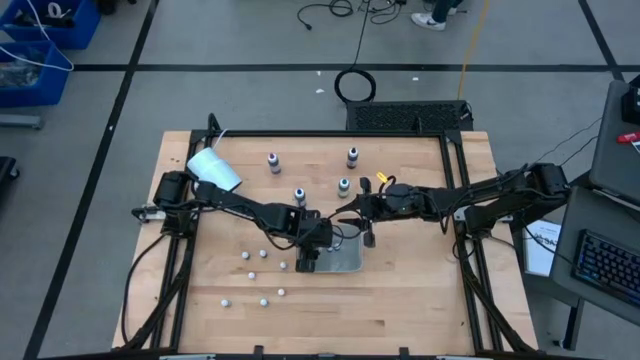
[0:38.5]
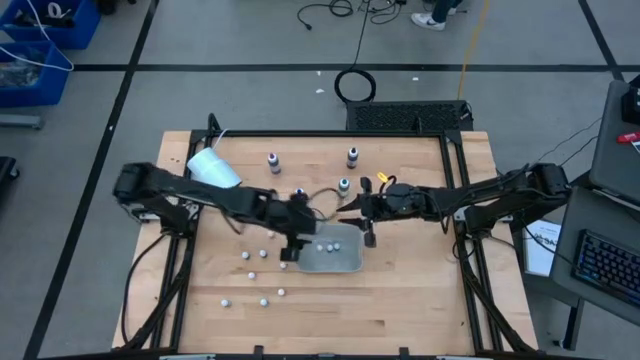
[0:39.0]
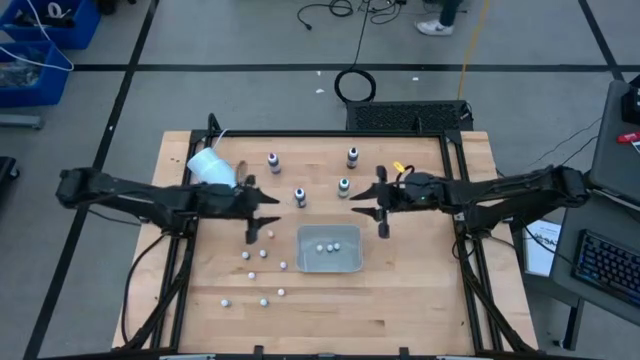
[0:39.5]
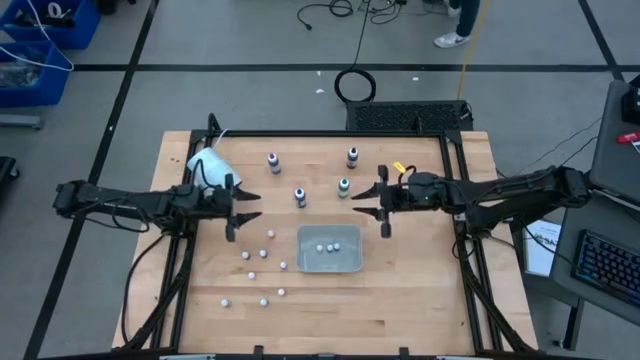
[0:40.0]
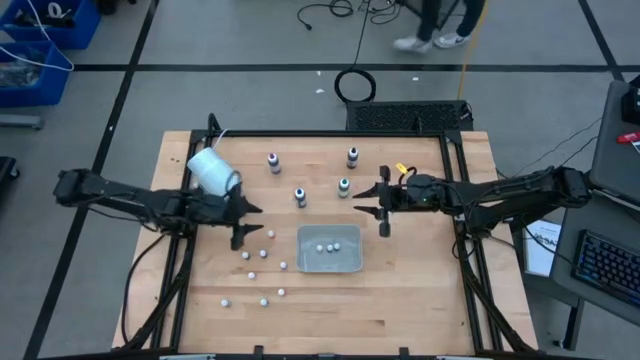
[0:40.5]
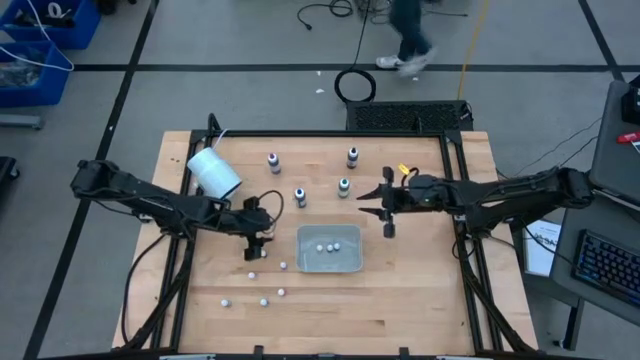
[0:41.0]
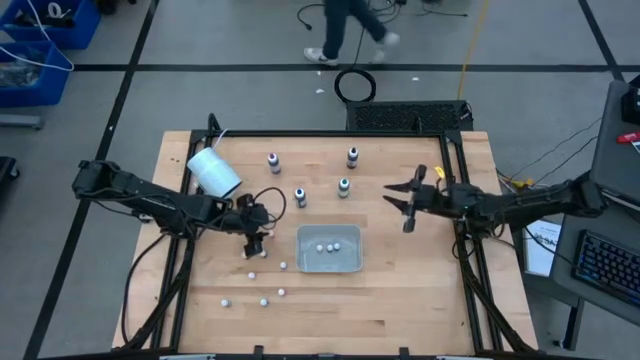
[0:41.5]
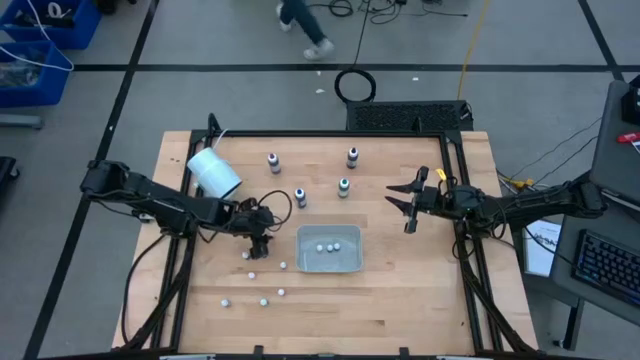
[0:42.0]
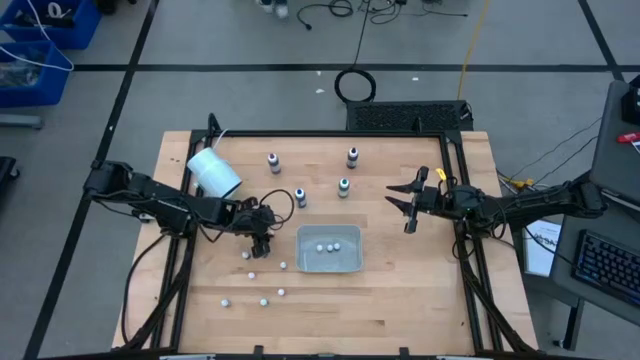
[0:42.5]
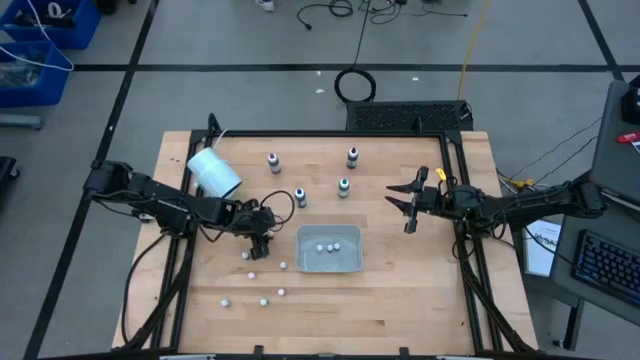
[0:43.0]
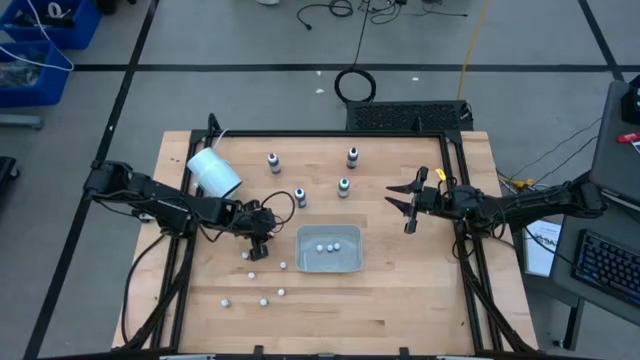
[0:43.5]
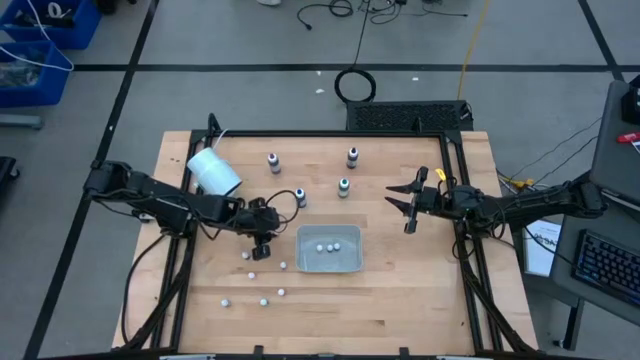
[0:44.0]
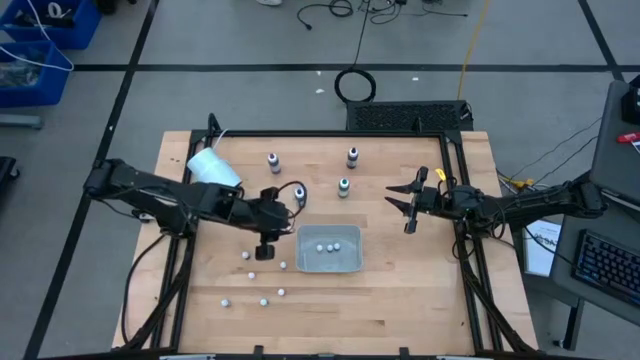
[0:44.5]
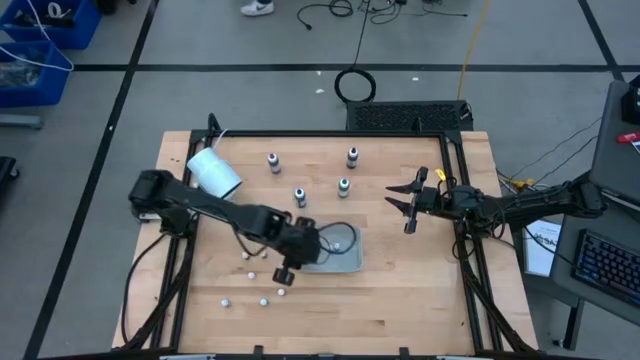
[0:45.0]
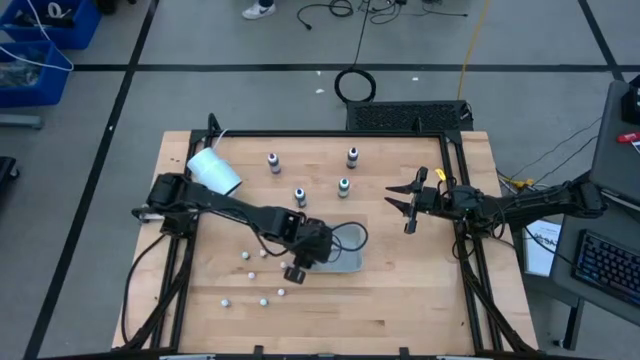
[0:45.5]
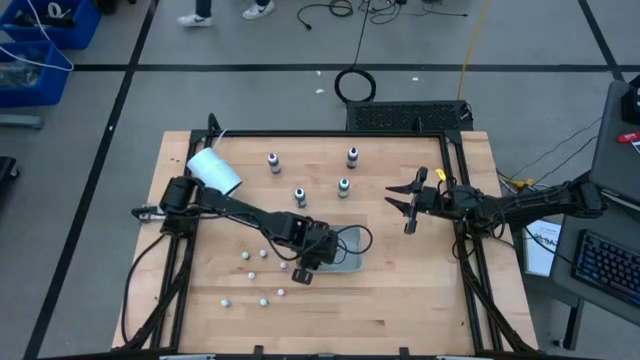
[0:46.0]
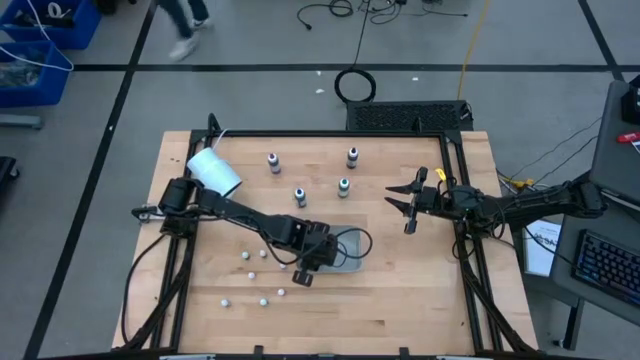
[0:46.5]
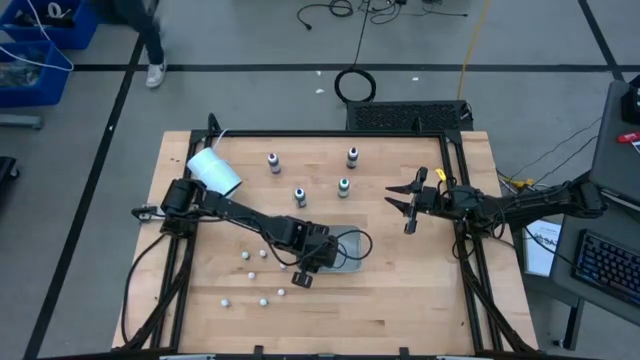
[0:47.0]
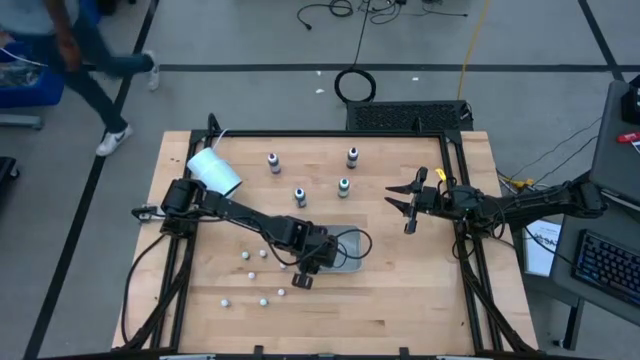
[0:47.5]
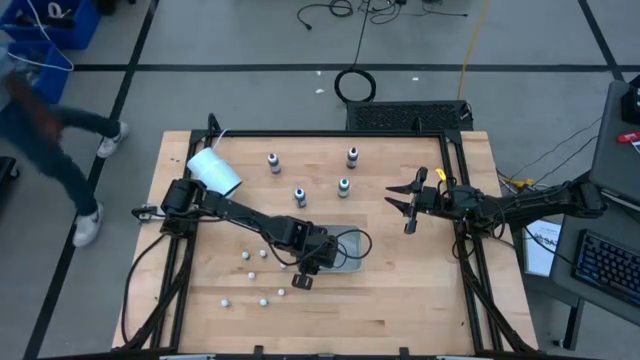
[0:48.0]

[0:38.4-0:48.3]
Task: Pick & Place food coloring
Put the orange food coloring bottle into the bin

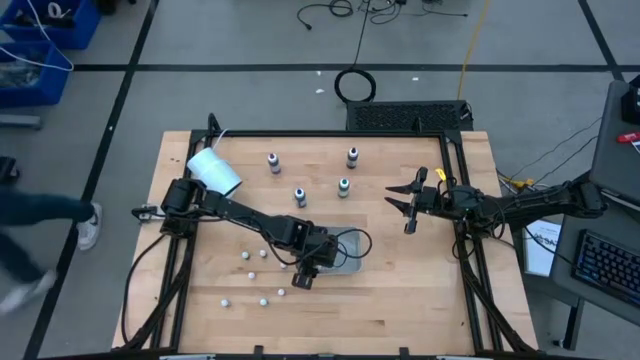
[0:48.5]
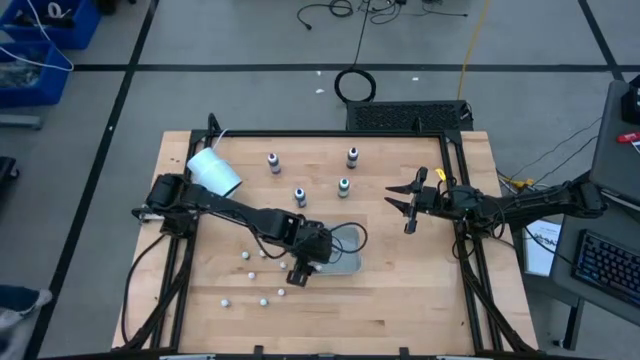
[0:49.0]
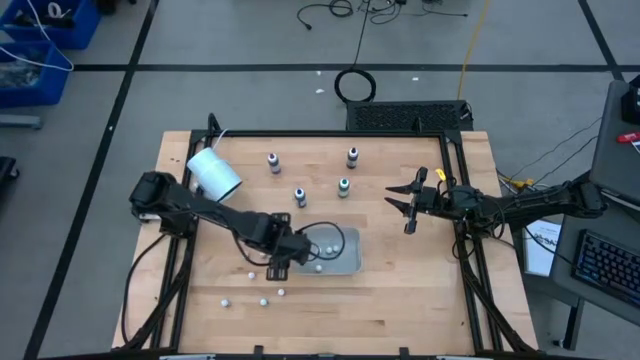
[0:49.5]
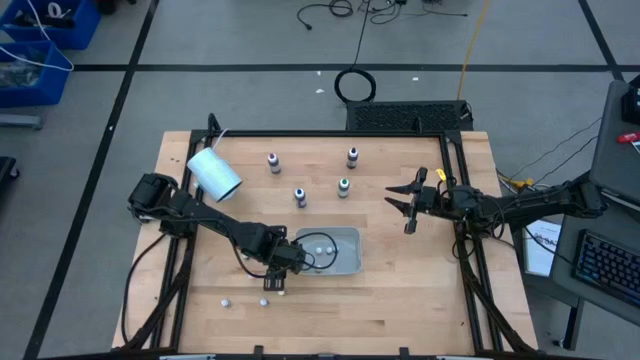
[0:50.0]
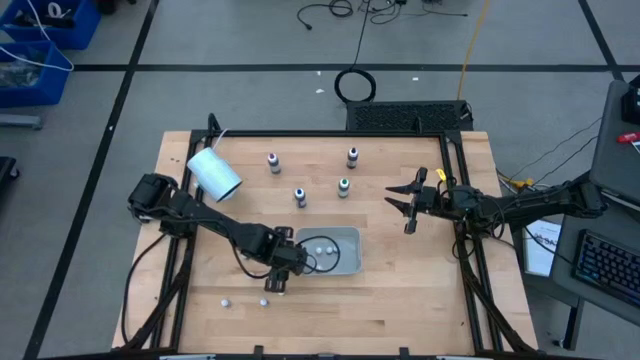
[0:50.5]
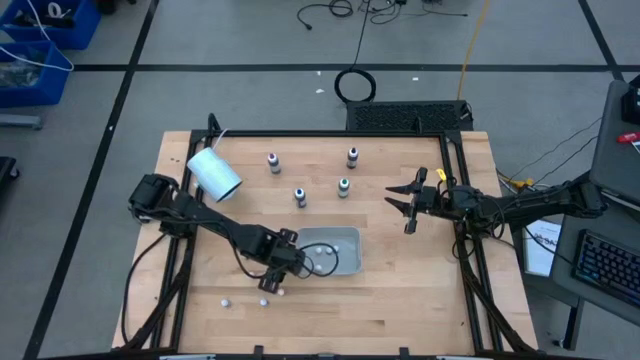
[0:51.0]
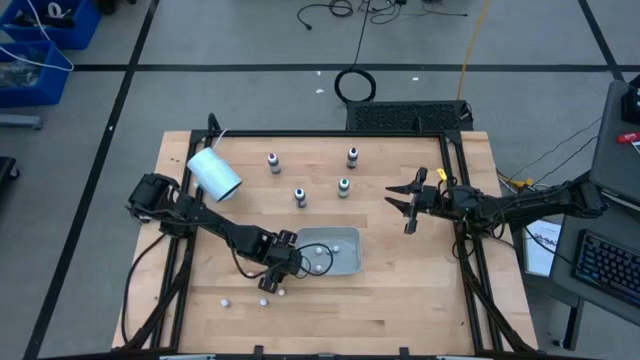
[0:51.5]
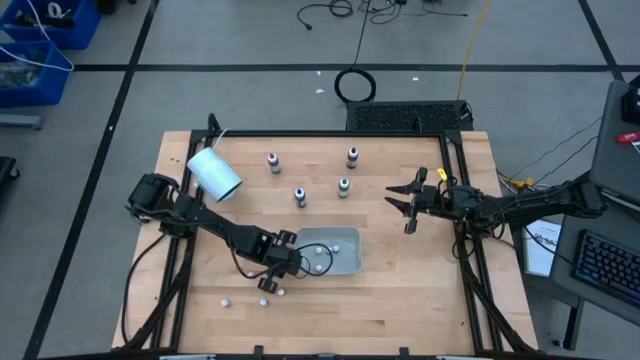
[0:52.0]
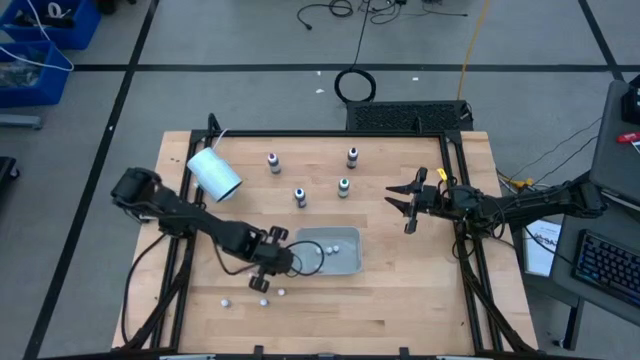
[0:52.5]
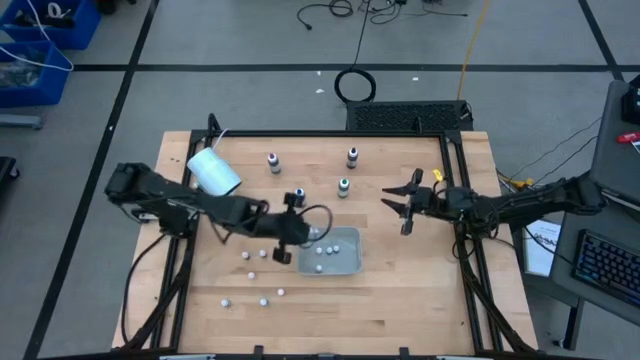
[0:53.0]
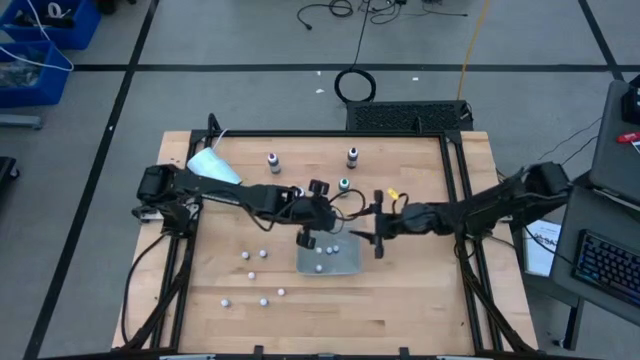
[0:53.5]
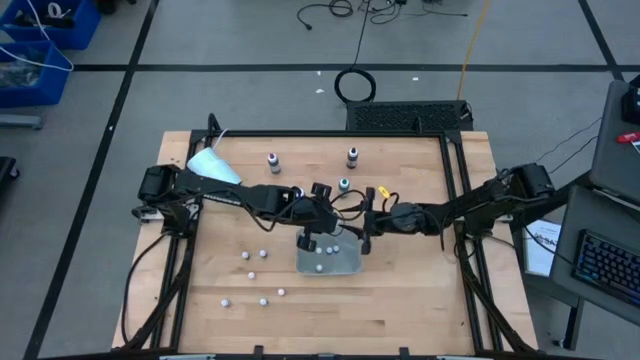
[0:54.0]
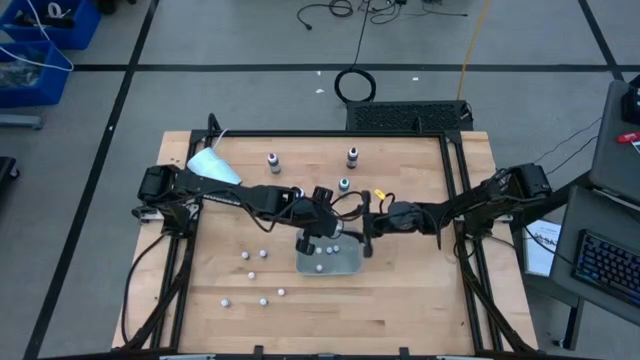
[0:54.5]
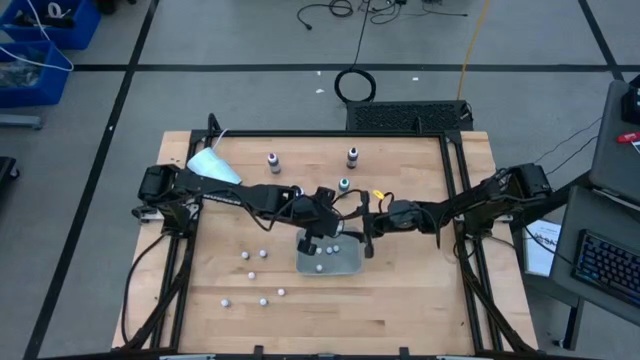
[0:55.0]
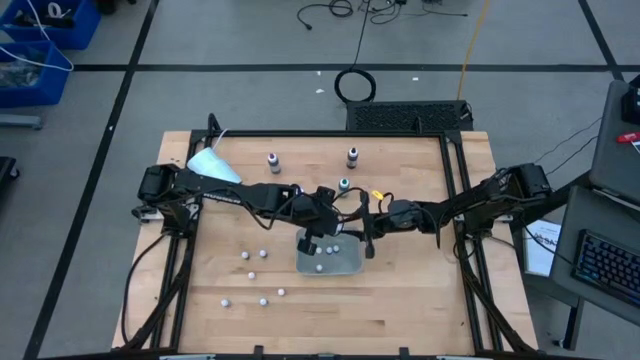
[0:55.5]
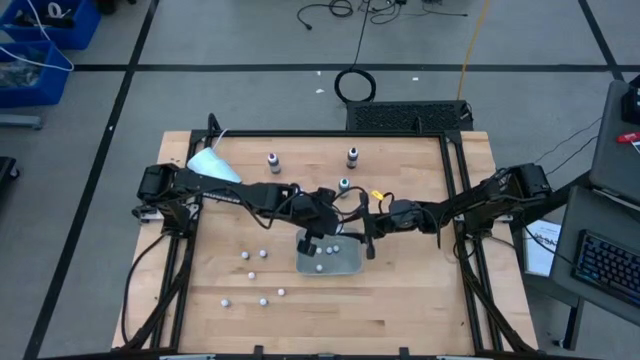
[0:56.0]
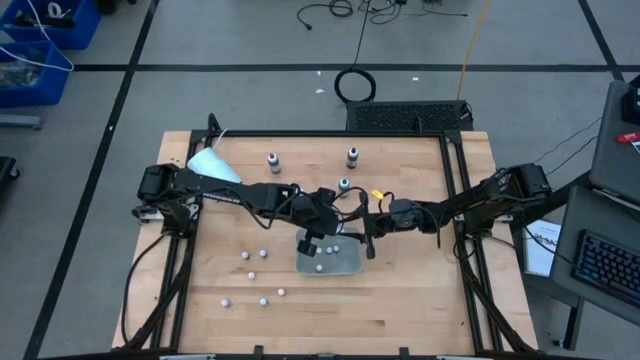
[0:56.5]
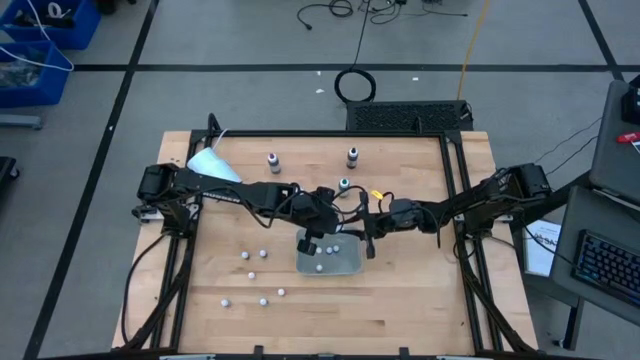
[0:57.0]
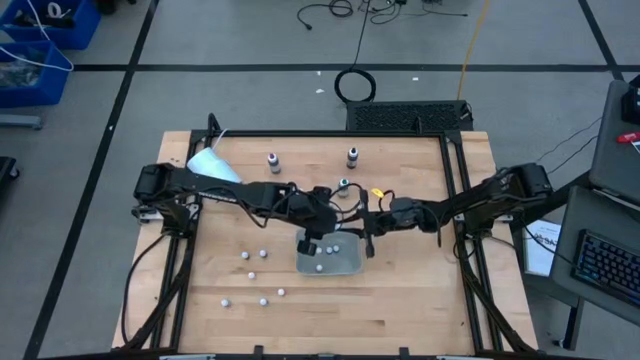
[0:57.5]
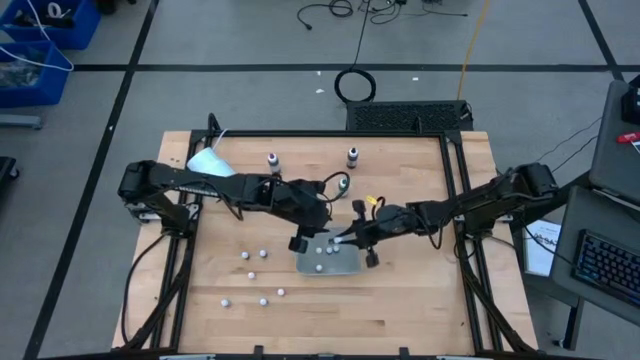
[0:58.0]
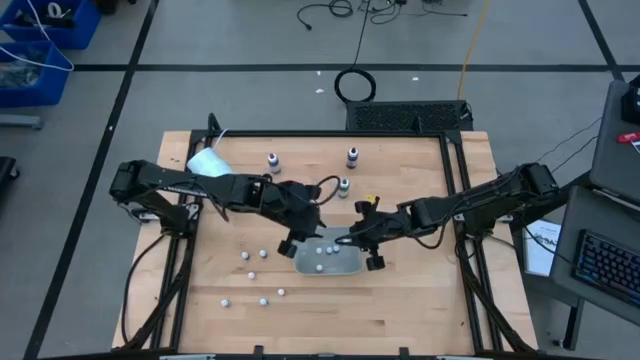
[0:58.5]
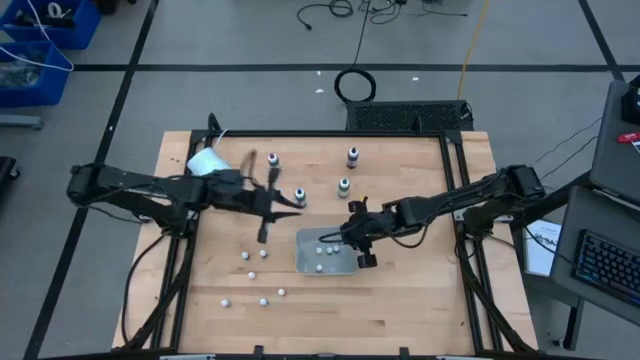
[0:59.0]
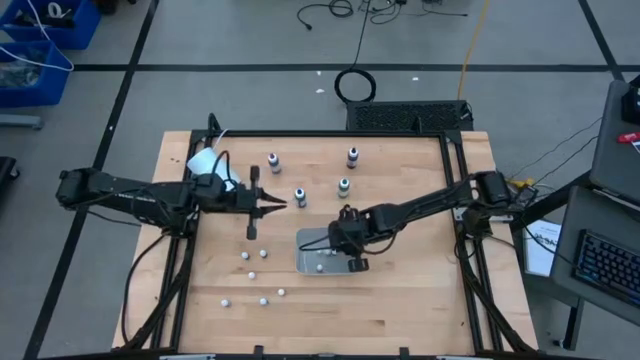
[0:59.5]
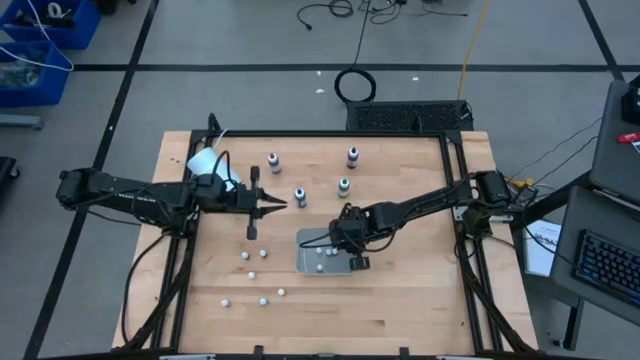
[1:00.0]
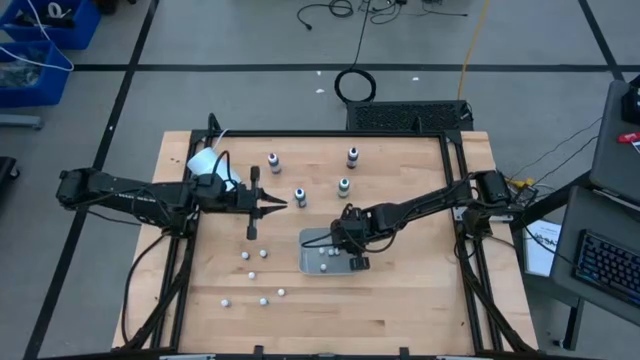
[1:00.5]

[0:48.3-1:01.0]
Put the purple food coloring bottle into the bin
